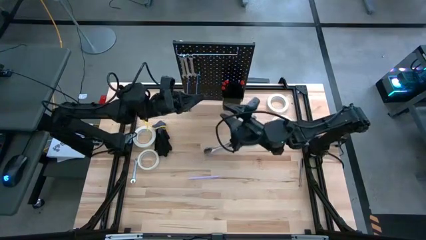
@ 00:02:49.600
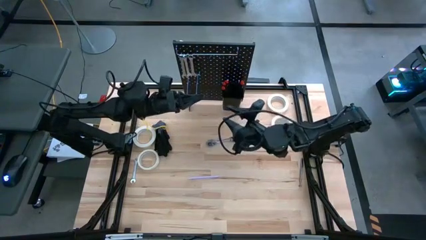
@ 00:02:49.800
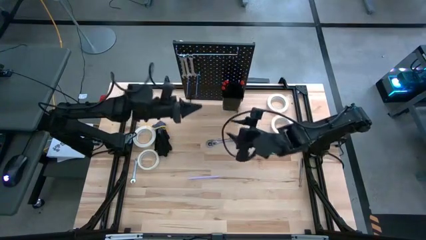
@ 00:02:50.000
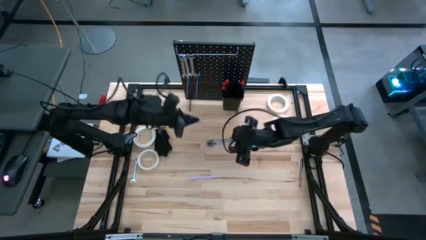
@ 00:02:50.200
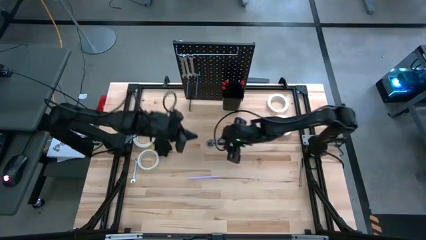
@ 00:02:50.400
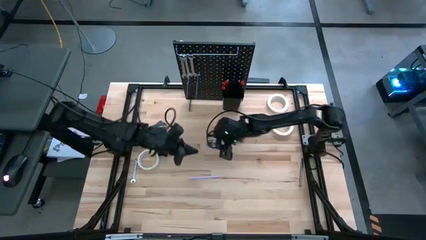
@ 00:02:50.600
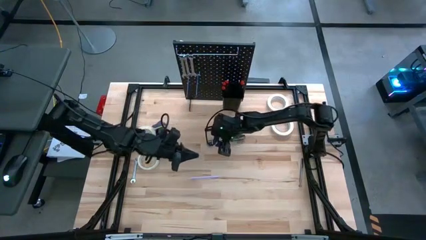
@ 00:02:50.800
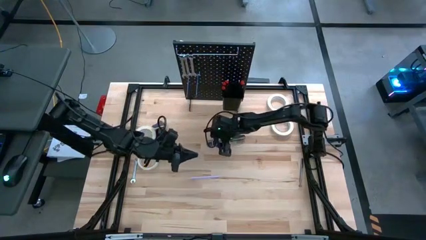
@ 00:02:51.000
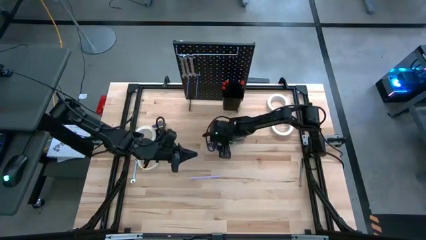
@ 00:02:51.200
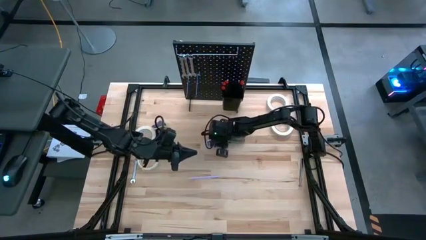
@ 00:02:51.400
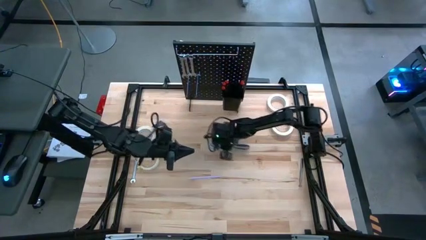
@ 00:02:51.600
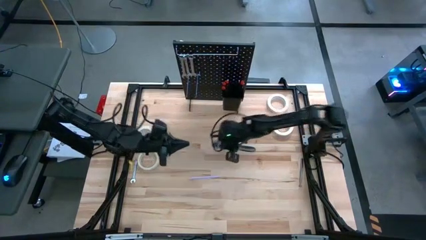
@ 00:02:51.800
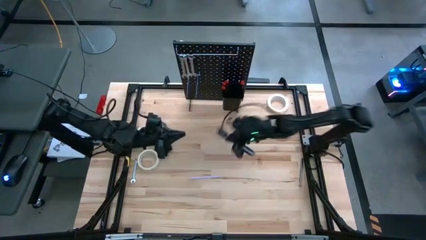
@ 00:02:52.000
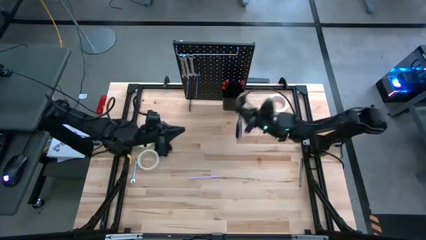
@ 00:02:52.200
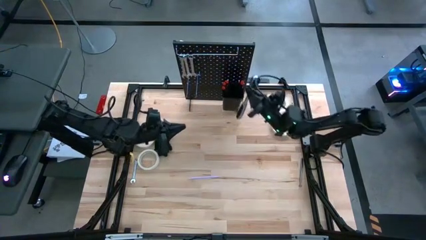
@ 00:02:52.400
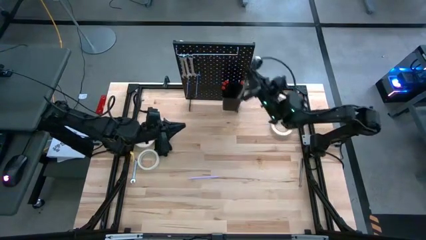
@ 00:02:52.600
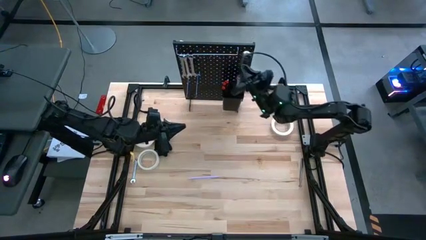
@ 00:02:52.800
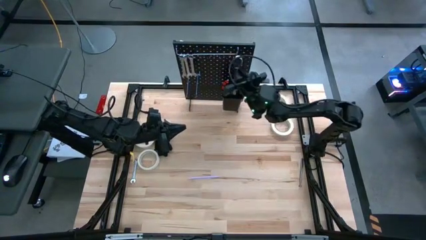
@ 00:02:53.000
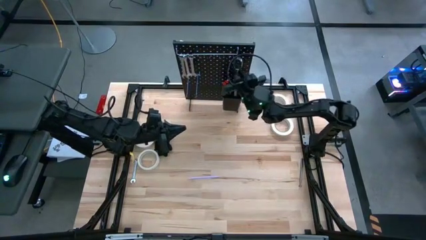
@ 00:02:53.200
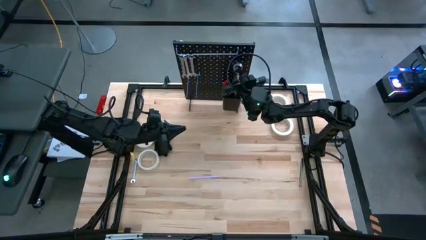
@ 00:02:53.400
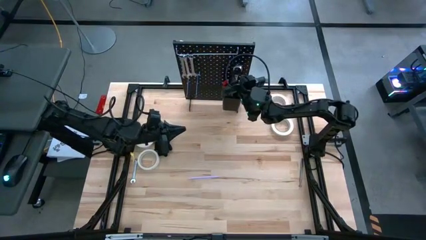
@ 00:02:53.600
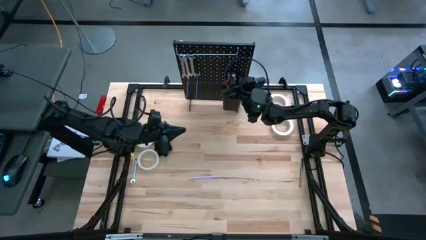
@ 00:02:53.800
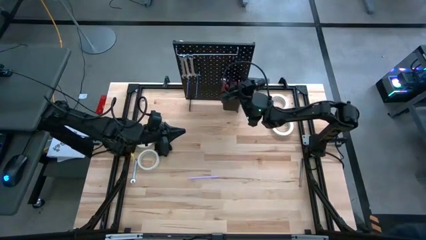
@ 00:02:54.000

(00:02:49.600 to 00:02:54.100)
Task: Hang tools onto peg board
Put the socket wrench into the black bin on the peg board

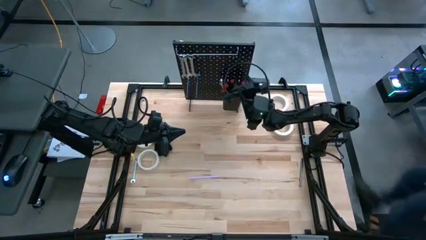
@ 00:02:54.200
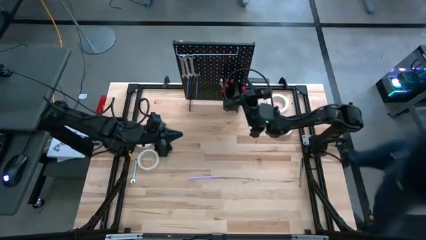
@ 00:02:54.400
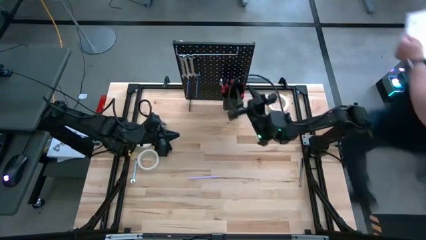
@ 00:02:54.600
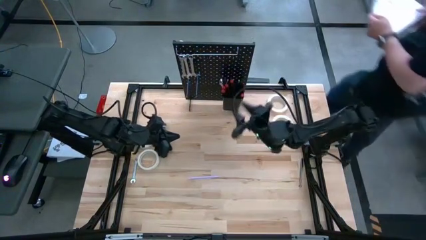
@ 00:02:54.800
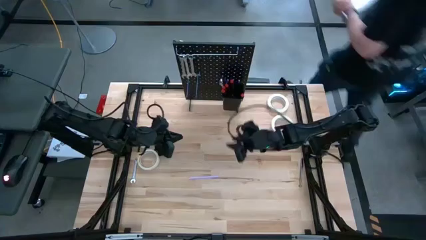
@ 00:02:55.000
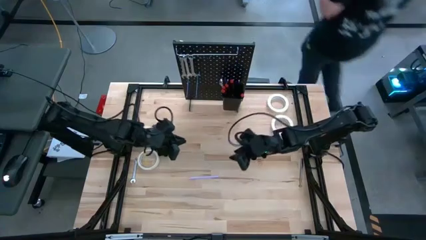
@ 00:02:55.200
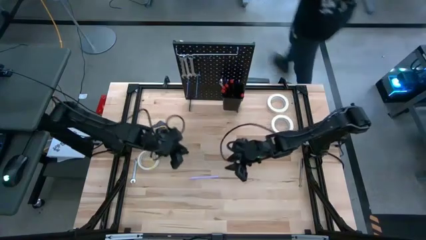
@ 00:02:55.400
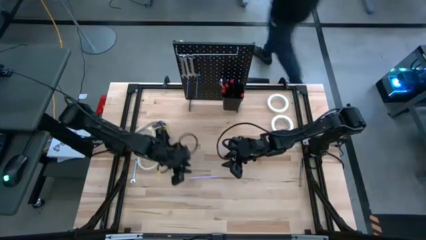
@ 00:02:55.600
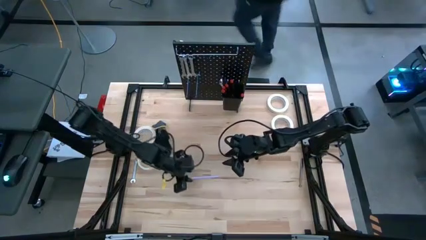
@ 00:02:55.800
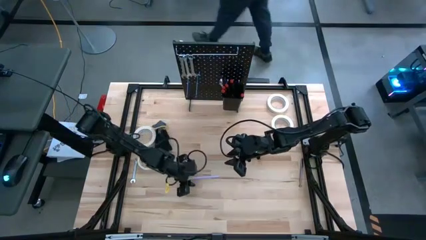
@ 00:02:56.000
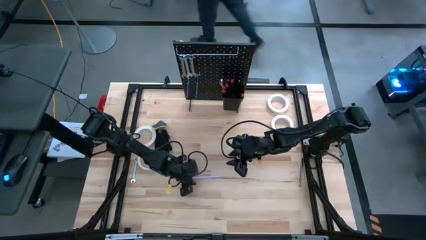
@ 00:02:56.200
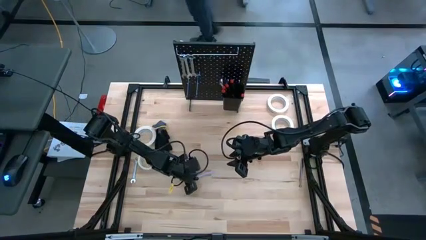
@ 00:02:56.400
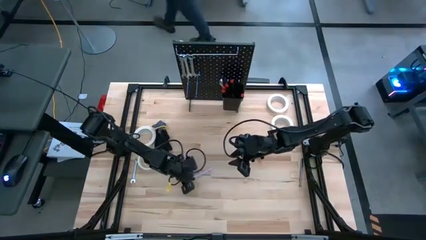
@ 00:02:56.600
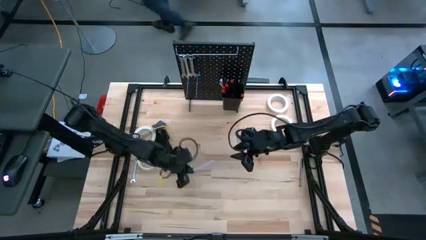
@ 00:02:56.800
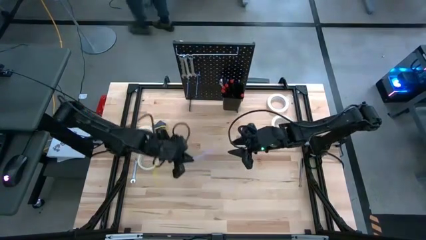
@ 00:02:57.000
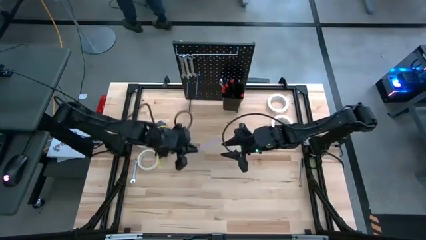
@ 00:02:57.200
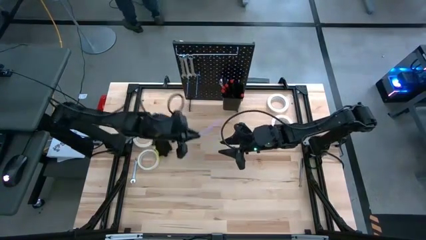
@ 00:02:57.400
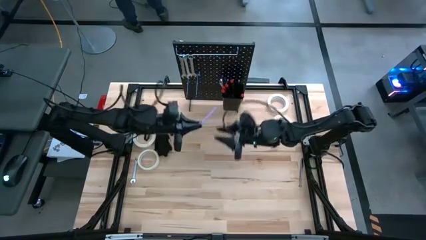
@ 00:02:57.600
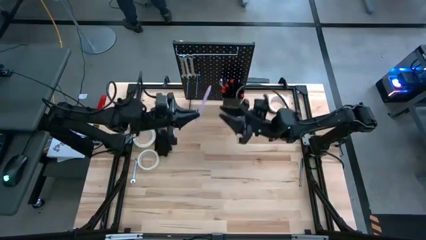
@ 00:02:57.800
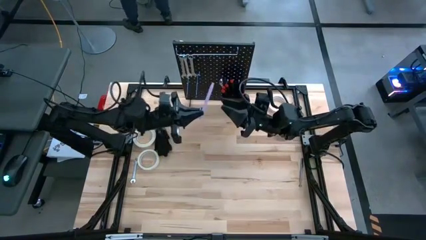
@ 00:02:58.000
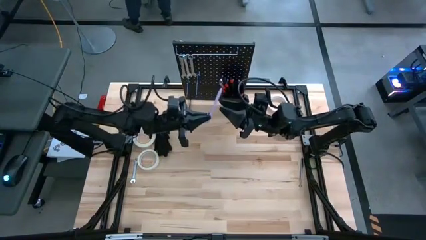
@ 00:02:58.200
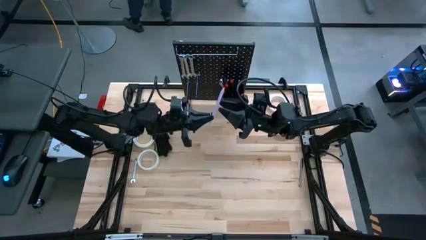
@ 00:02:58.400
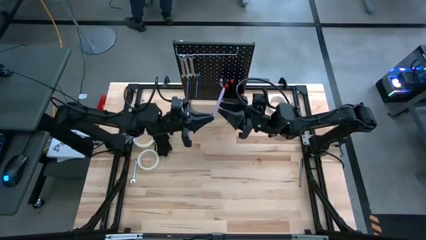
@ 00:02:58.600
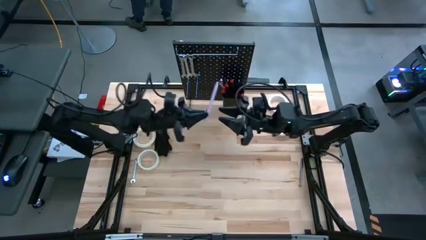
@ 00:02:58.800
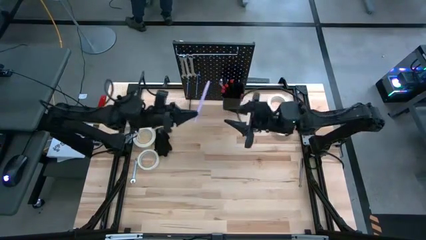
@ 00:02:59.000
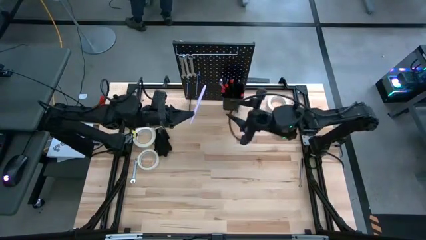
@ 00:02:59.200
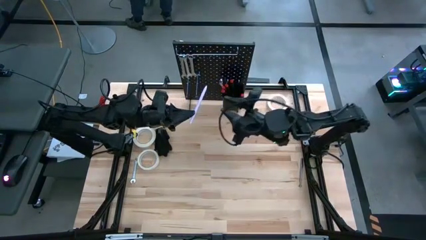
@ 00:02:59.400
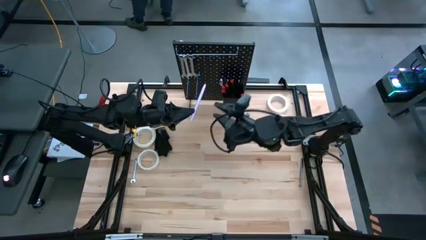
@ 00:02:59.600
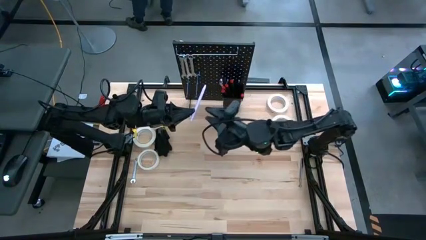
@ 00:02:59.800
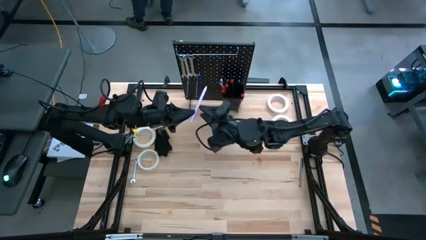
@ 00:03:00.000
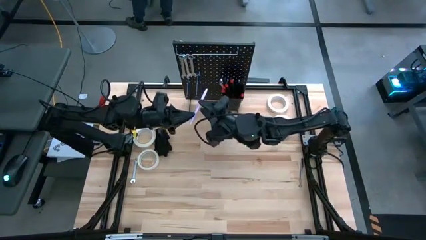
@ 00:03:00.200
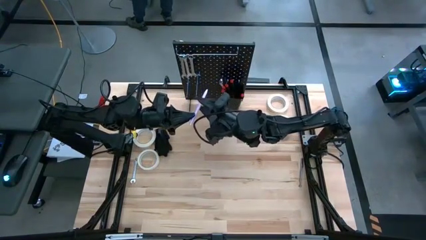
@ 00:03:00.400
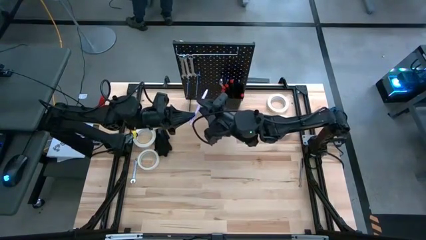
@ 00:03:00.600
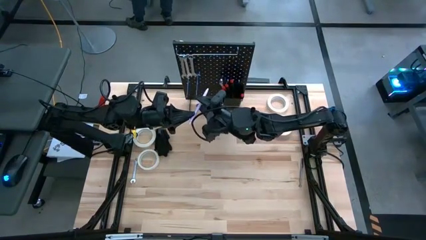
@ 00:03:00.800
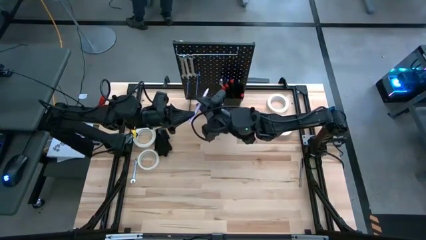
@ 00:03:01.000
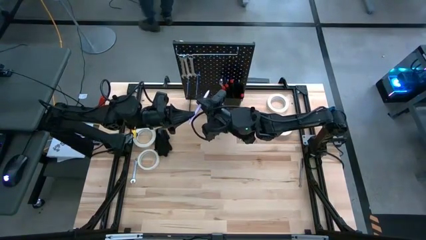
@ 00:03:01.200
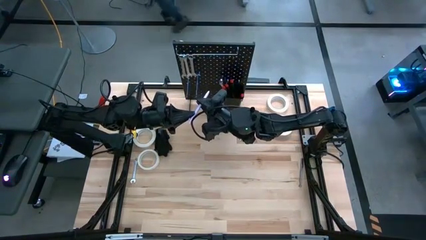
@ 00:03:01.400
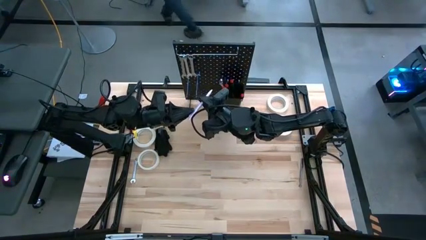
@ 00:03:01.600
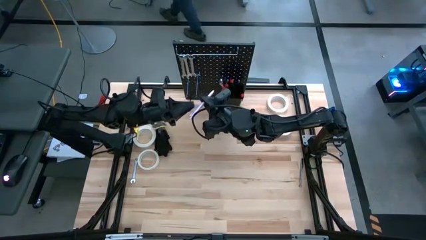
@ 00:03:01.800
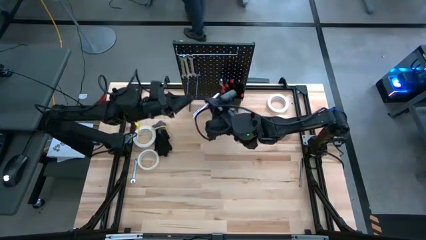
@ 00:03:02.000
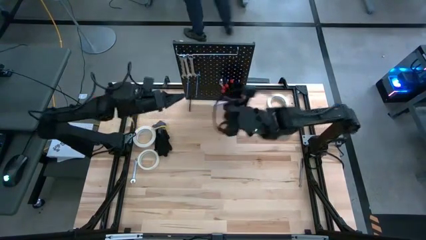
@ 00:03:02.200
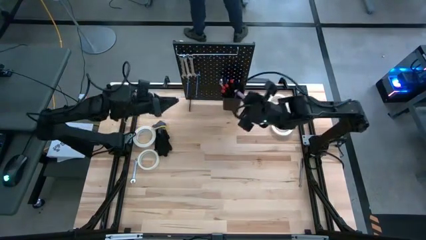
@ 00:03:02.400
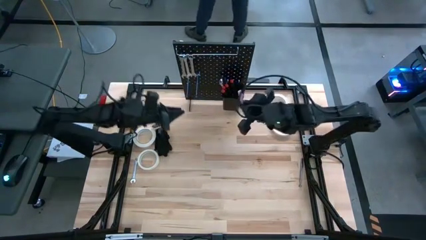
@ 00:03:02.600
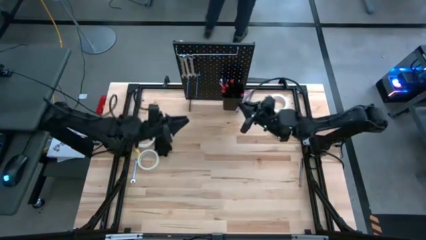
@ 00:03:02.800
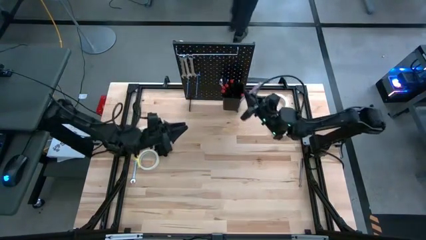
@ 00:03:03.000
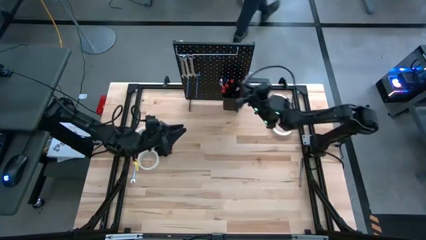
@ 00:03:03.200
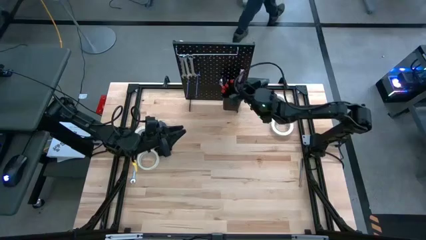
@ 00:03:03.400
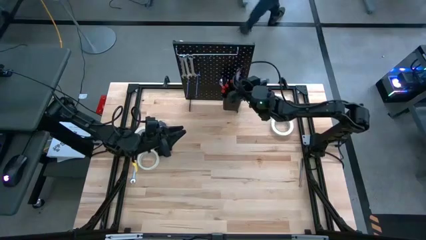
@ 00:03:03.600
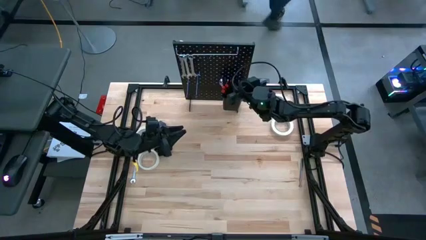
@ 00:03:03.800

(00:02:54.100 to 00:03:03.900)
Put the violet pen into the black bin on the peg board
